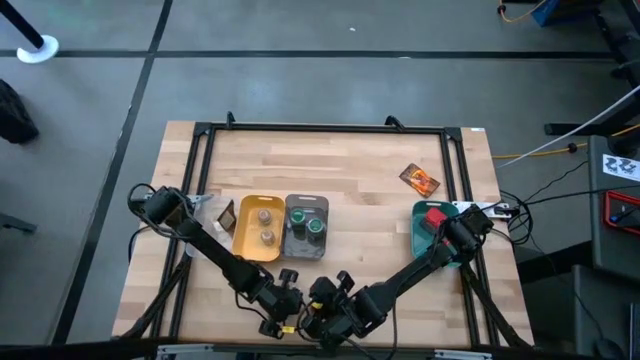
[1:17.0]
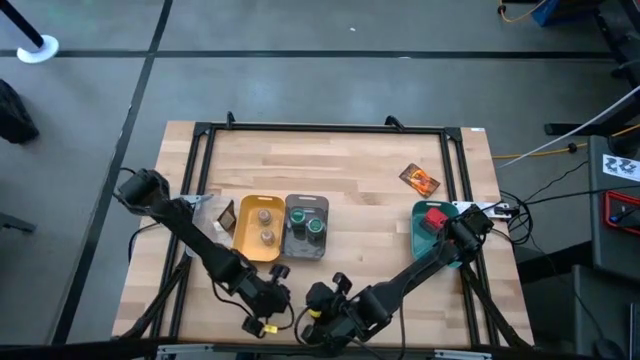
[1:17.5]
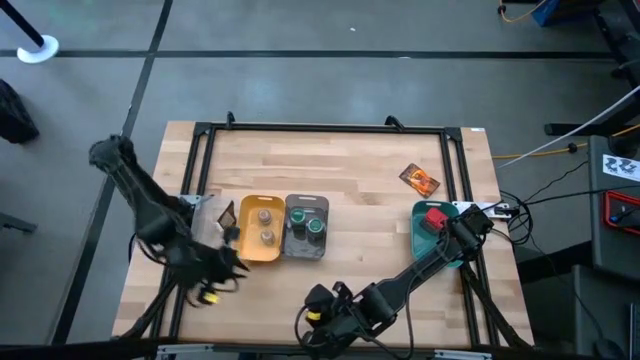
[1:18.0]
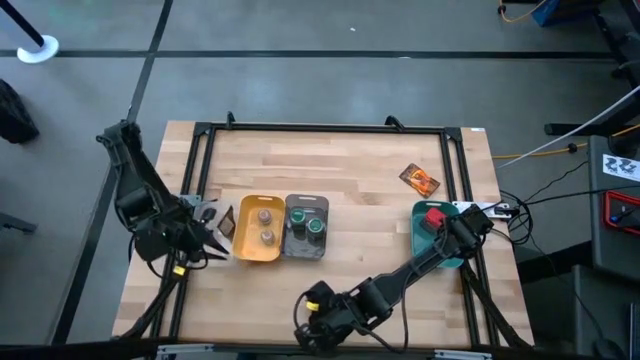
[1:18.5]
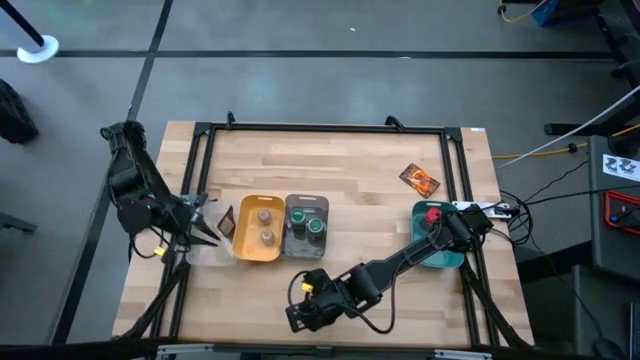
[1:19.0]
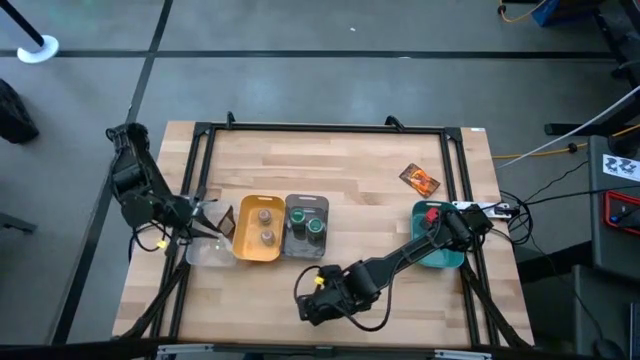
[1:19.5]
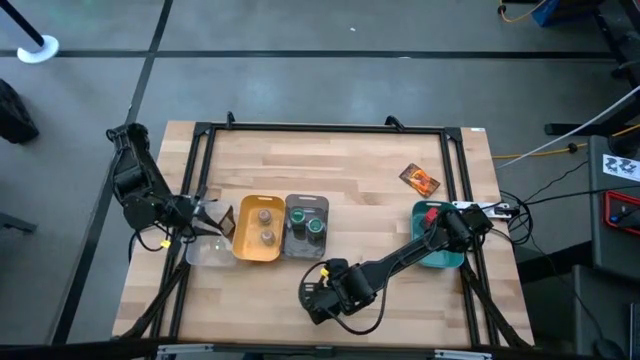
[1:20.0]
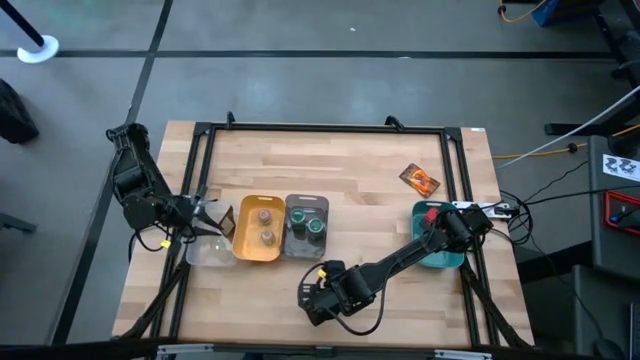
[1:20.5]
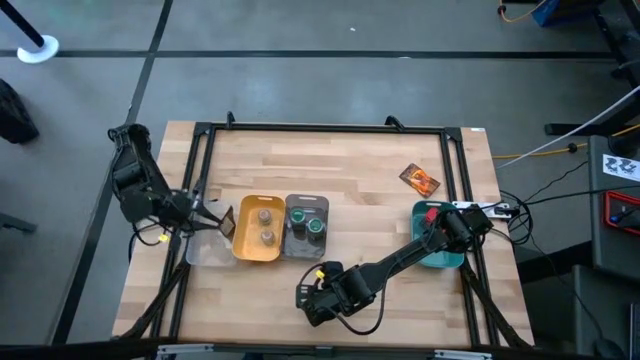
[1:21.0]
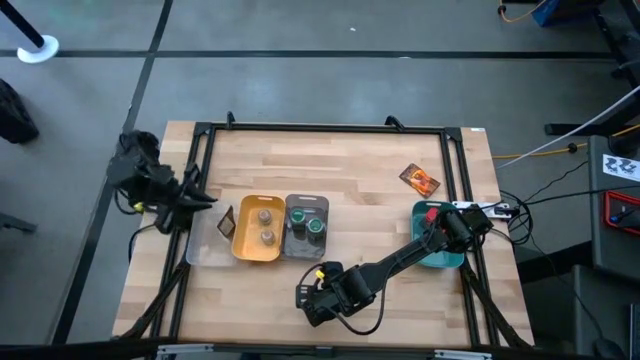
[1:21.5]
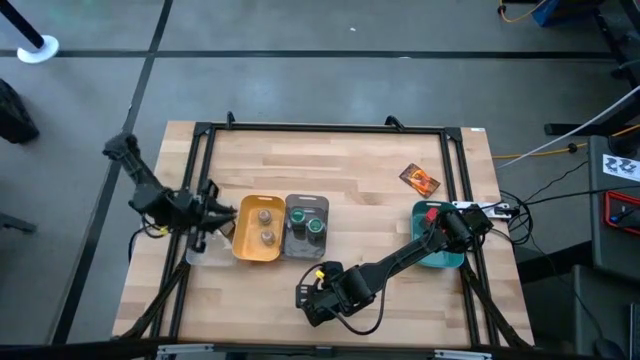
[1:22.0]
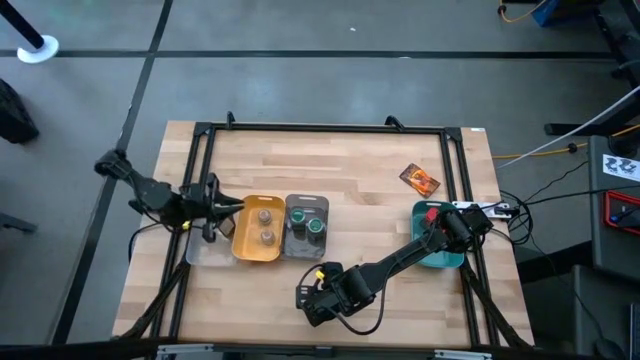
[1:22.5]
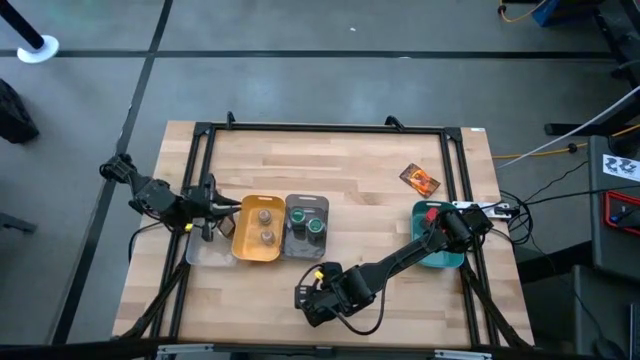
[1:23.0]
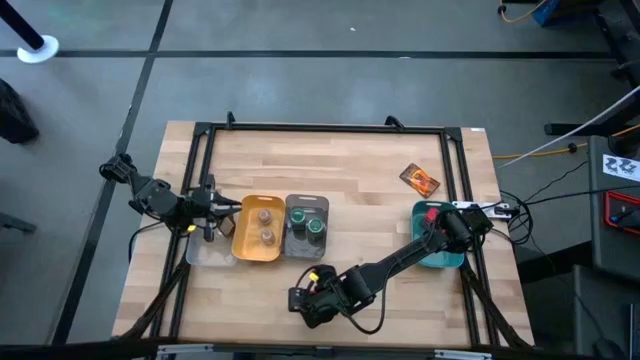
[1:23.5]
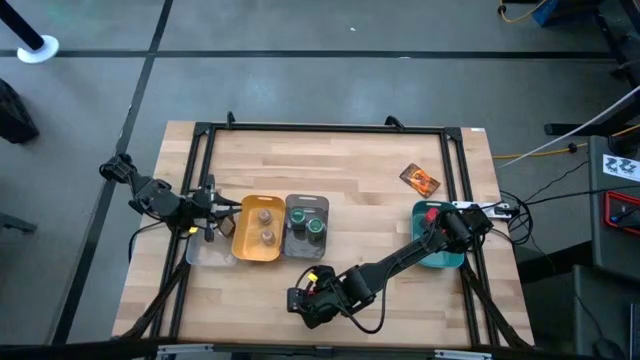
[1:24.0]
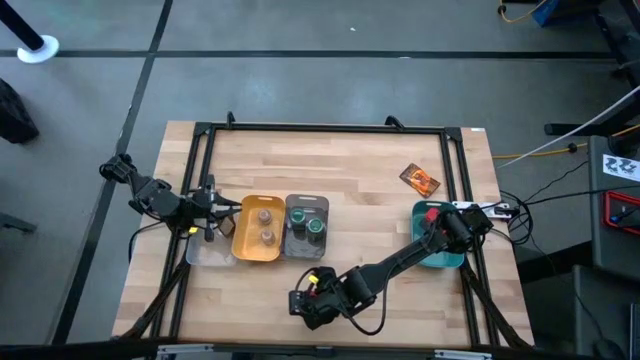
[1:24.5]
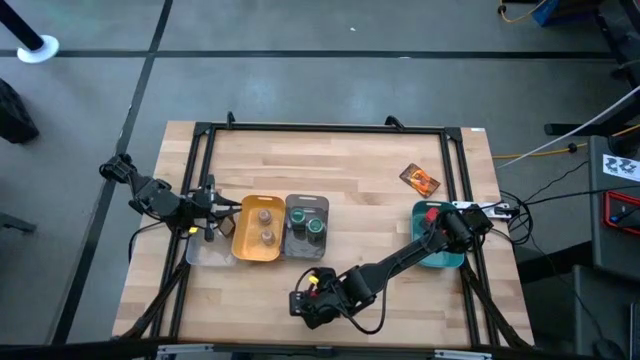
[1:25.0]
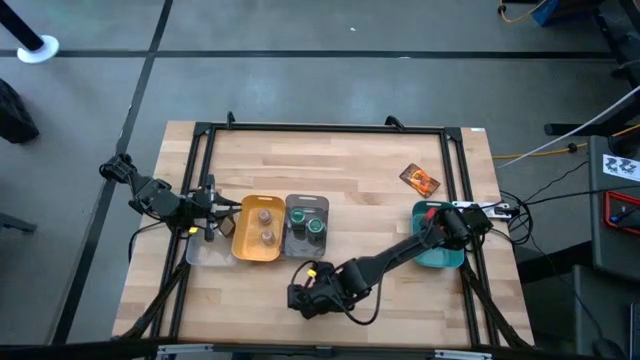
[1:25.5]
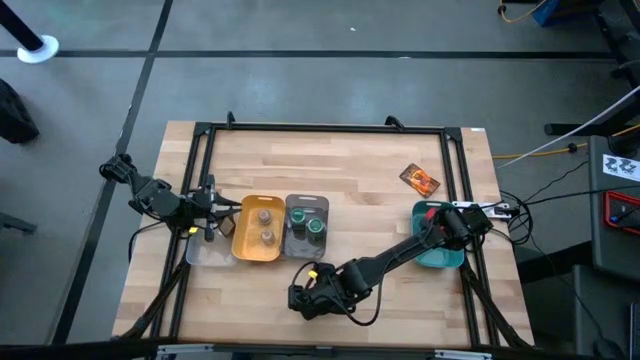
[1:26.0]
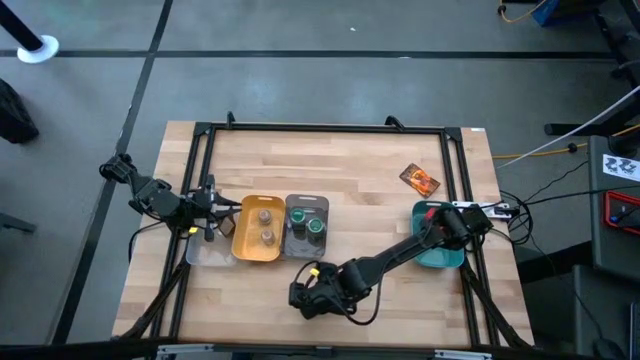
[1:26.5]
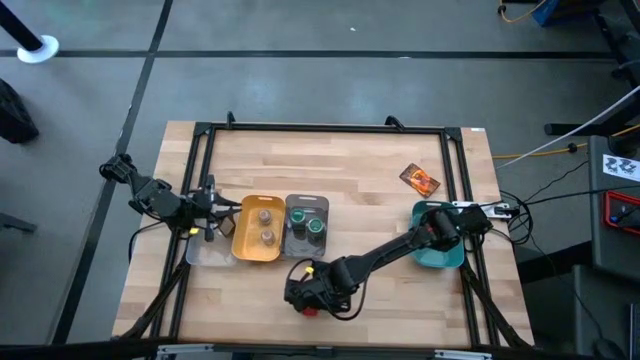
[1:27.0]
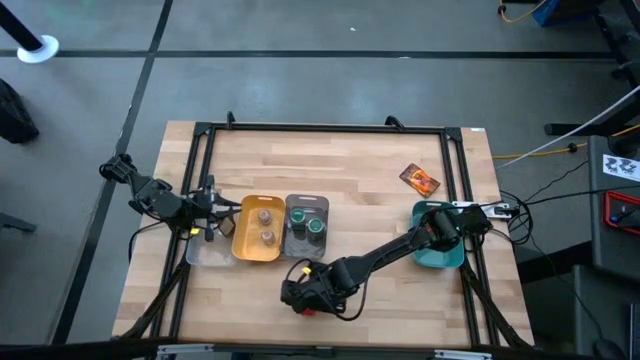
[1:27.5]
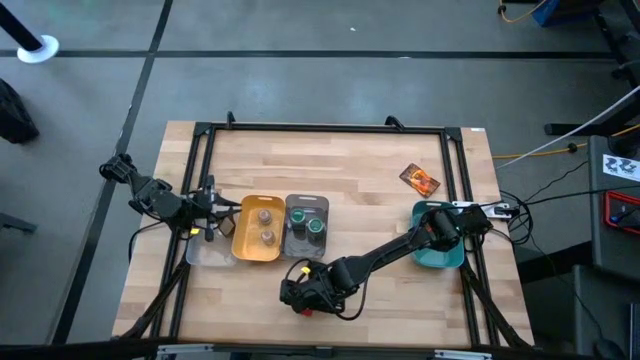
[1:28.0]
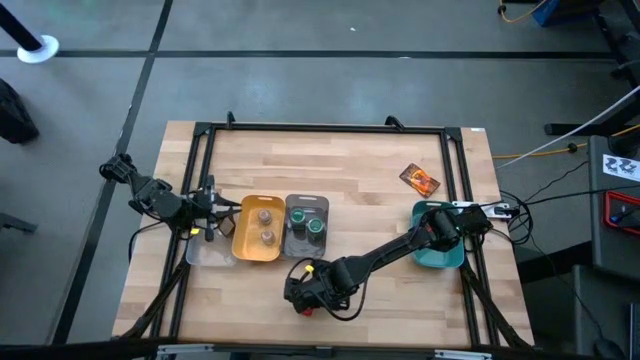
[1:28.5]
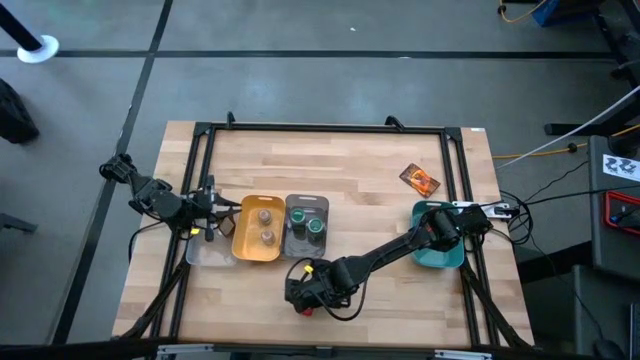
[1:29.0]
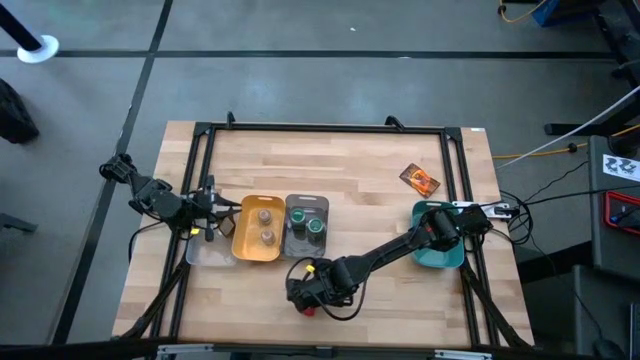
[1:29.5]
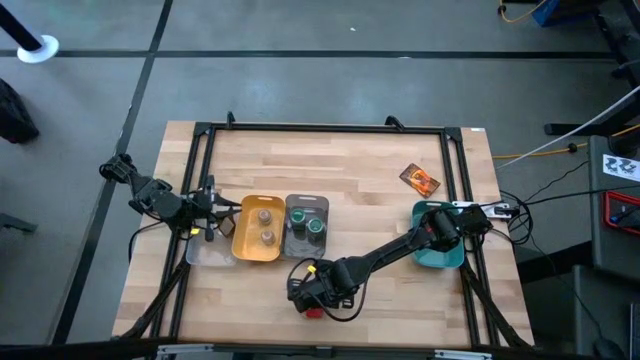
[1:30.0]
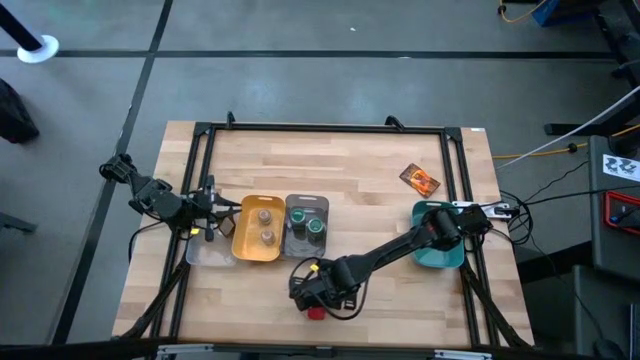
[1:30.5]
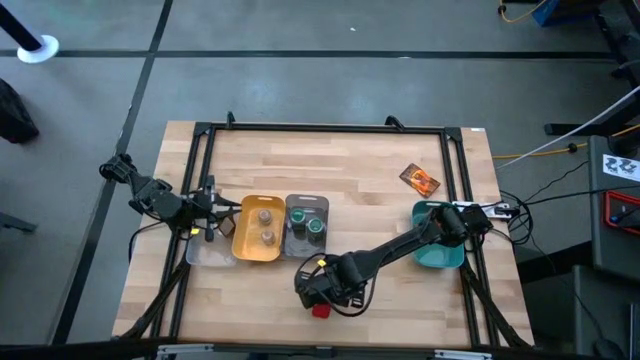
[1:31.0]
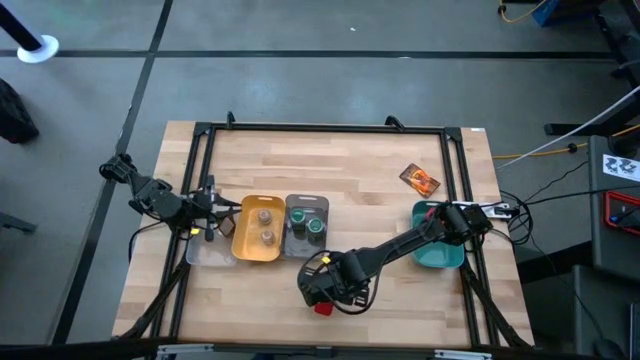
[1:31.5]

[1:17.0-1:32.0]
Task: Sort spices by type
Put the red spice can into the green bin

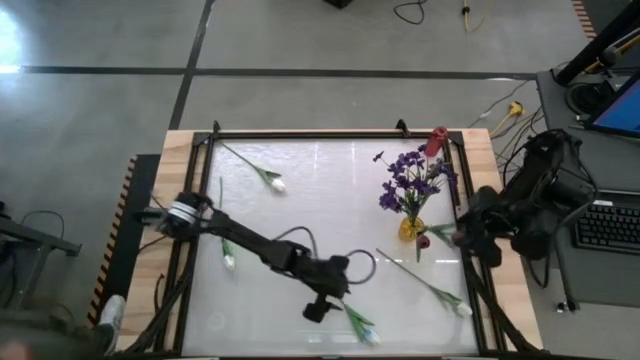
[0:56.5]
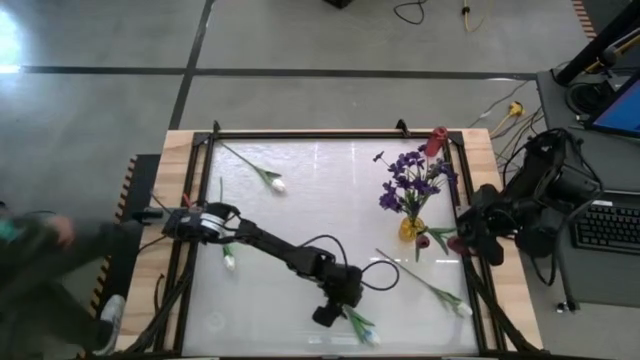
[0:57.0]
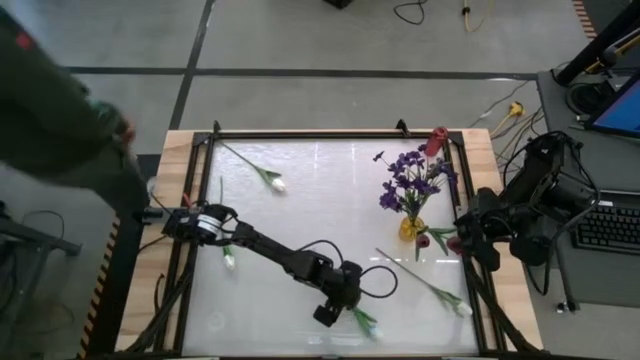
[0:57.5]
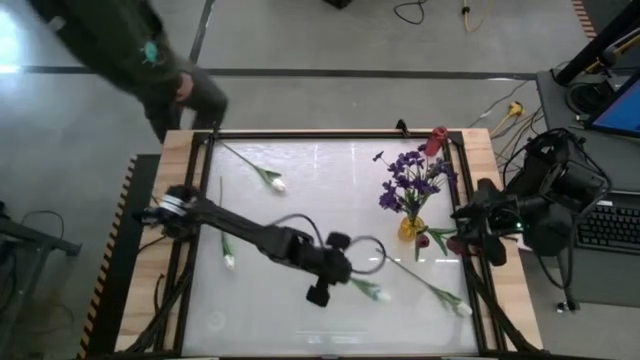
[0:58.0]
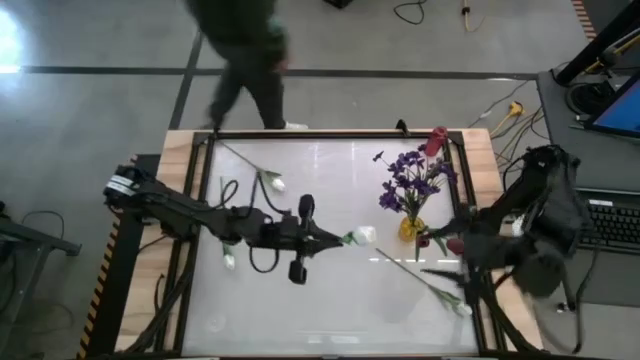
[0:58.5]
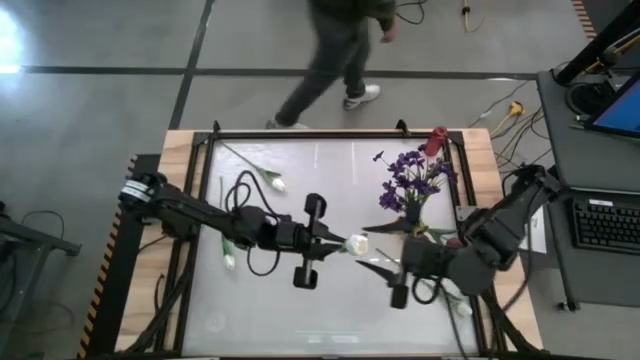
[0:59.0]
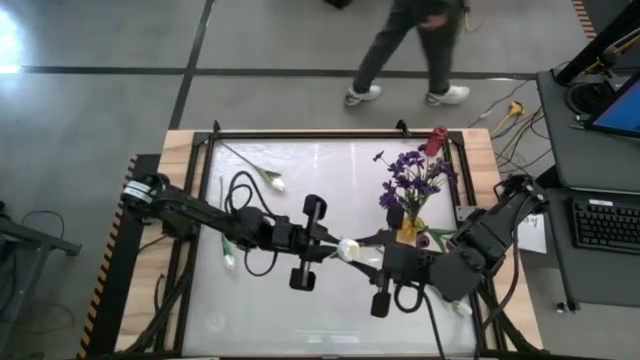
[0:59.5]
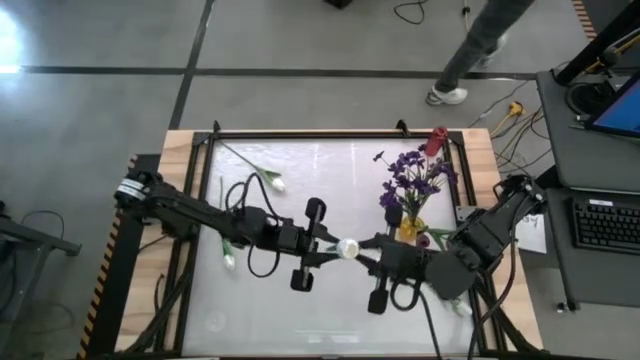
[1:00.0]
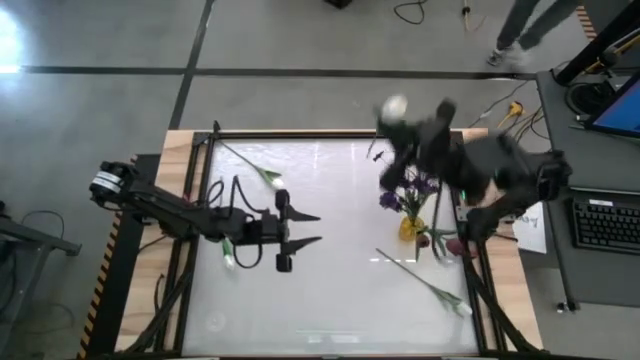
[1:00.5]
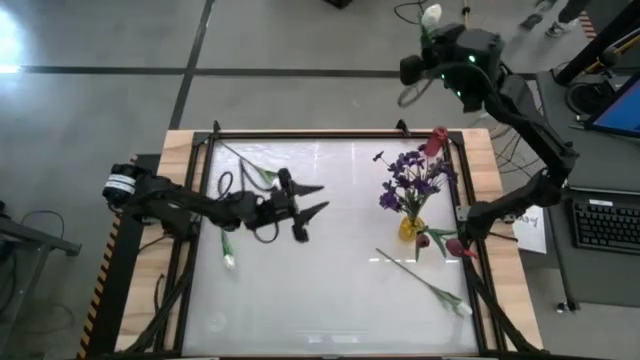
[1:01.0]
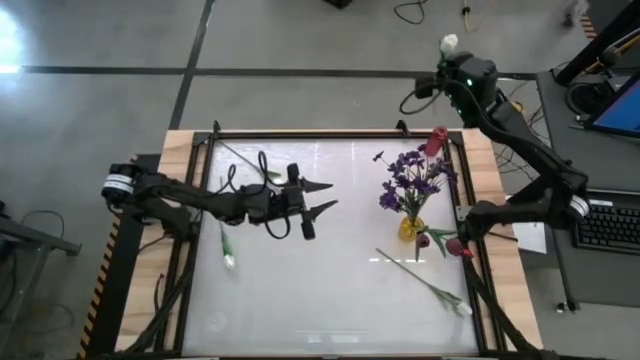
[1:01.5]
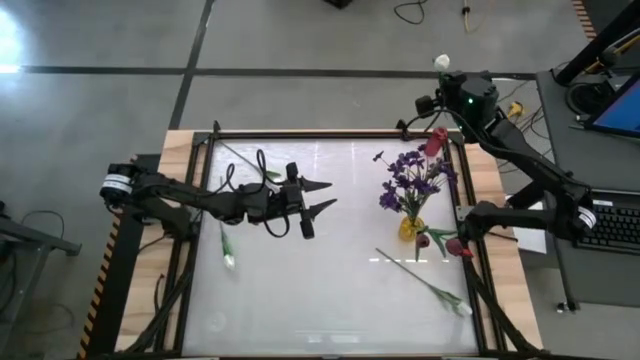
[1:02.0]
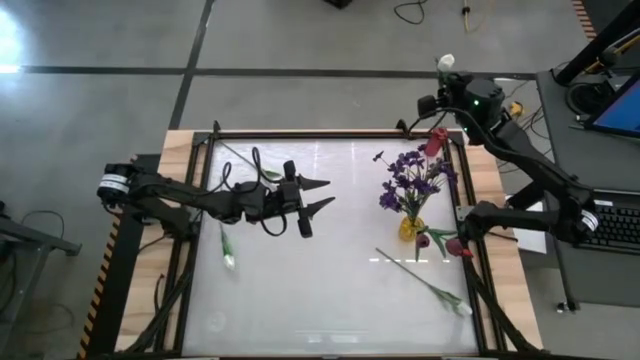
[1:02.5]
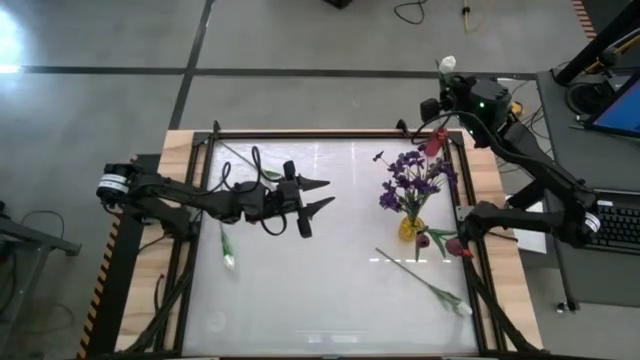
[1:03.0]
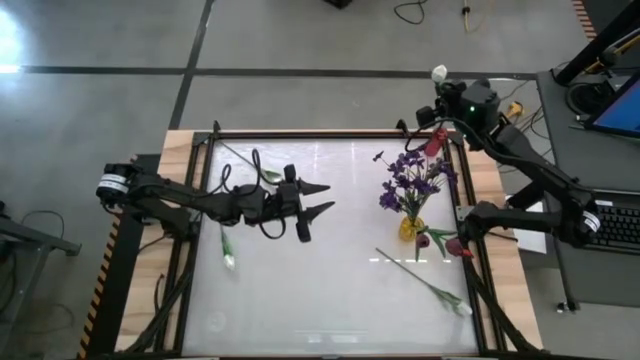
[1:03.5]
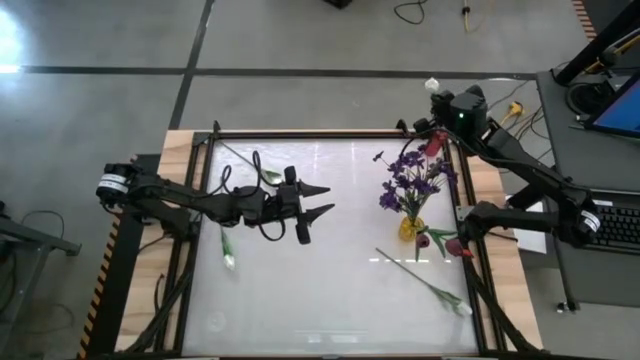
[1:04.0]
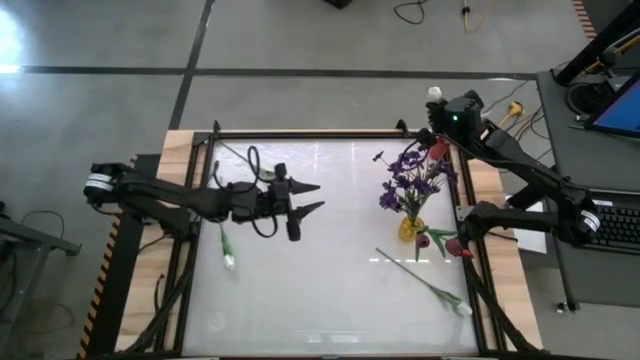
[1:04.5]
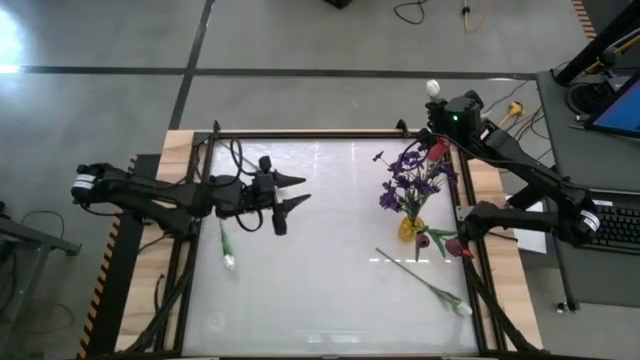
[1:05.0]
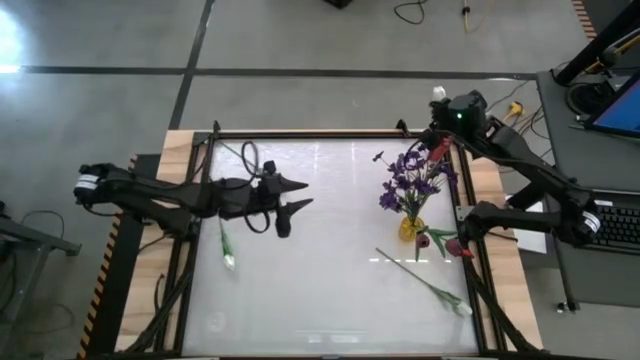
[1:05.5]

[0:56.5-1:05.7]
Task: Sort flowers into vase by color
Put the lower middle white flower into the red vase
